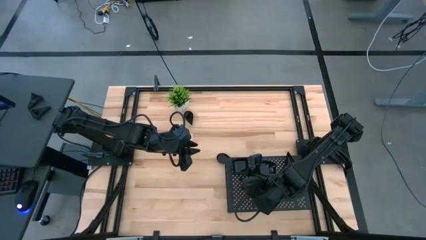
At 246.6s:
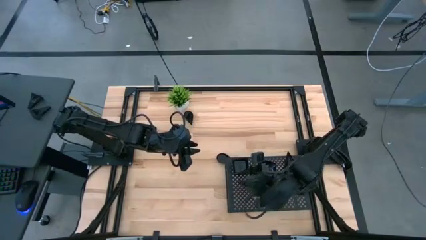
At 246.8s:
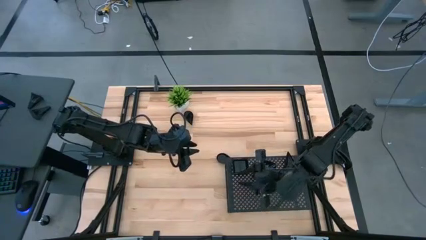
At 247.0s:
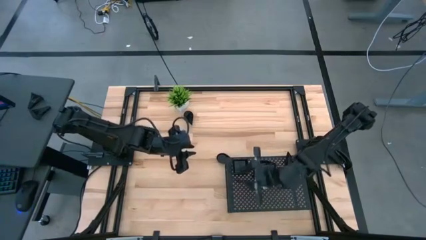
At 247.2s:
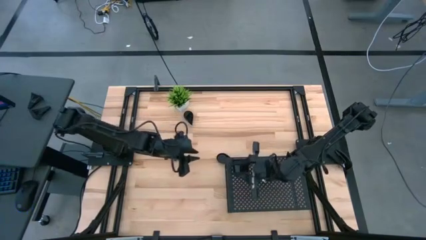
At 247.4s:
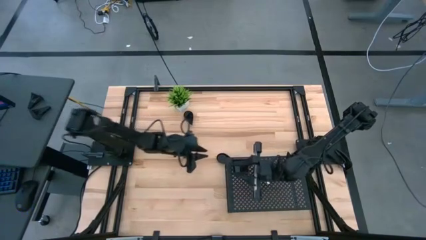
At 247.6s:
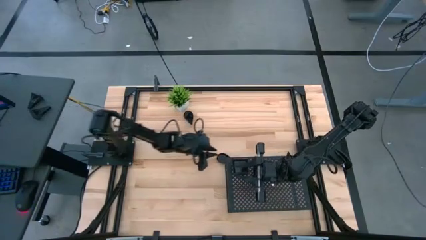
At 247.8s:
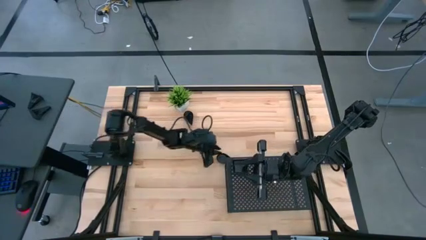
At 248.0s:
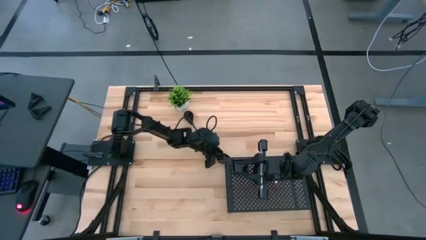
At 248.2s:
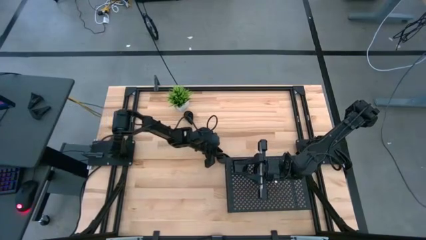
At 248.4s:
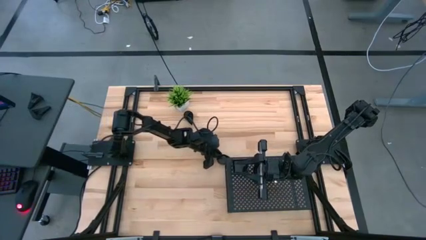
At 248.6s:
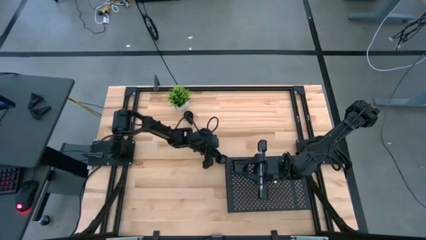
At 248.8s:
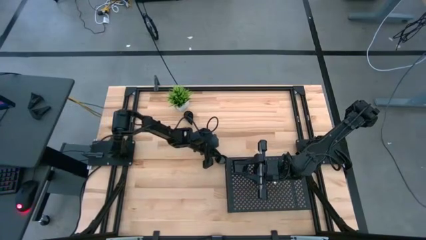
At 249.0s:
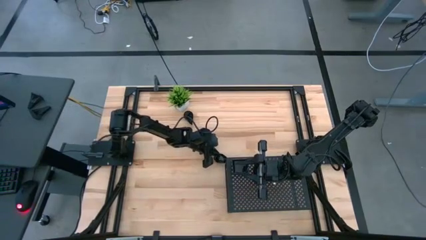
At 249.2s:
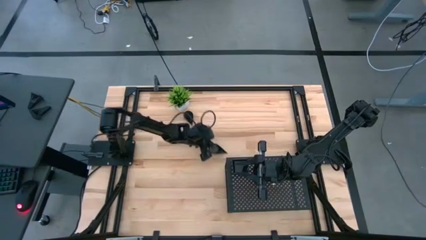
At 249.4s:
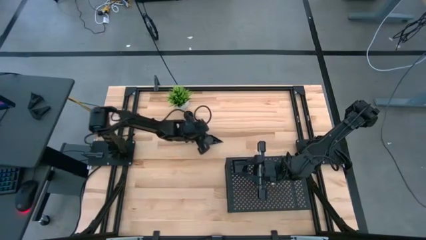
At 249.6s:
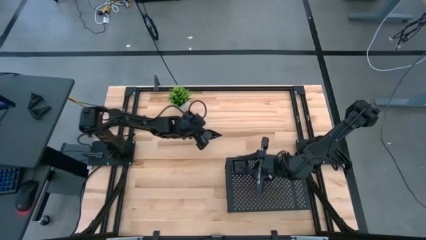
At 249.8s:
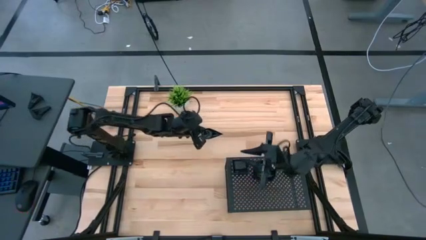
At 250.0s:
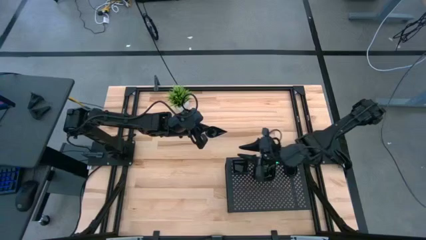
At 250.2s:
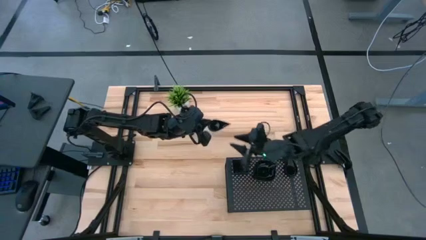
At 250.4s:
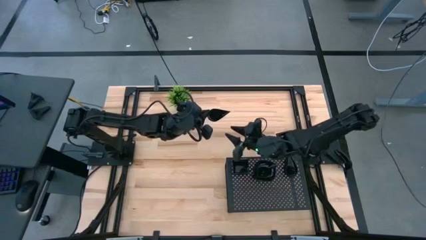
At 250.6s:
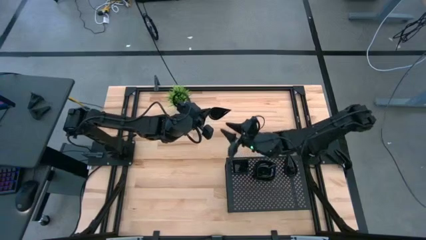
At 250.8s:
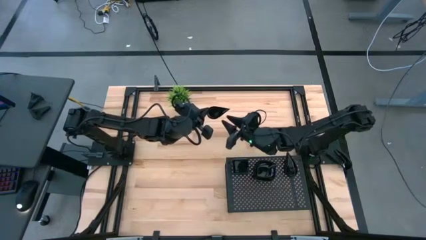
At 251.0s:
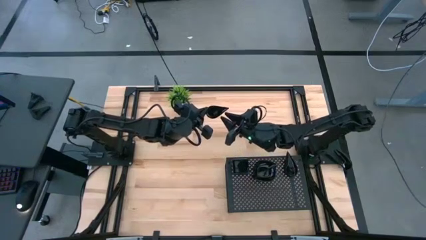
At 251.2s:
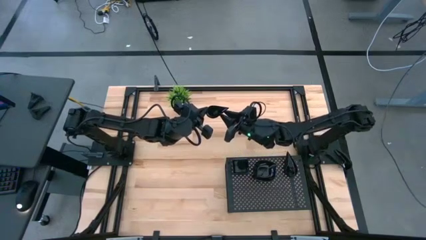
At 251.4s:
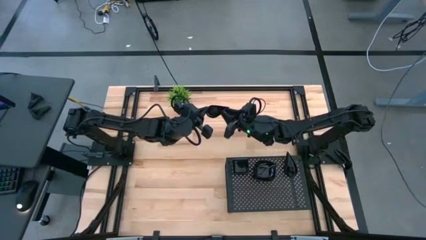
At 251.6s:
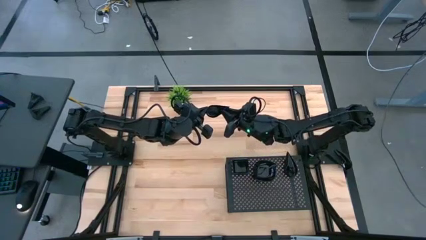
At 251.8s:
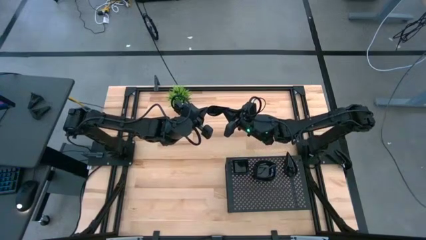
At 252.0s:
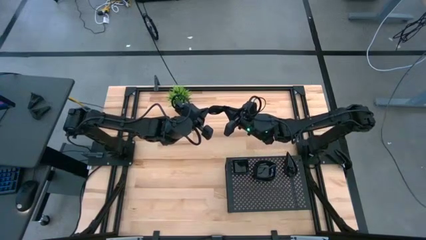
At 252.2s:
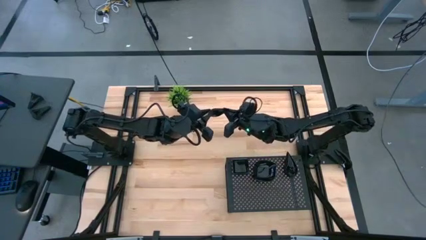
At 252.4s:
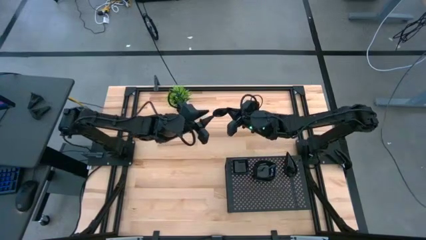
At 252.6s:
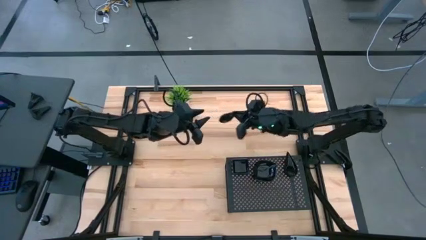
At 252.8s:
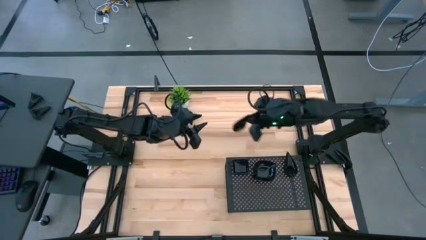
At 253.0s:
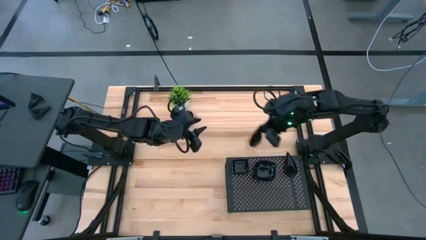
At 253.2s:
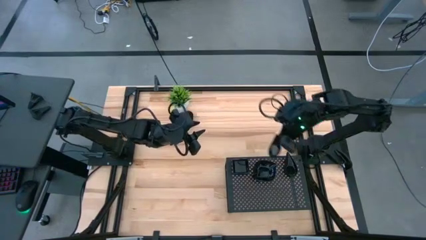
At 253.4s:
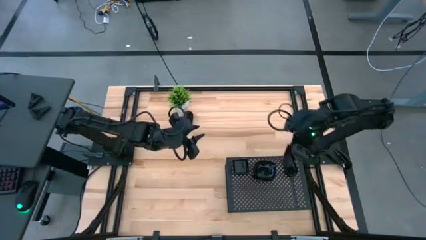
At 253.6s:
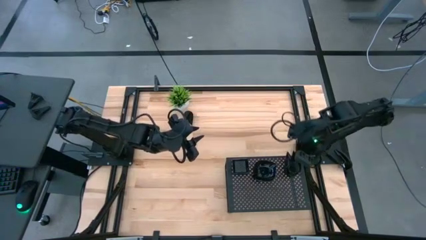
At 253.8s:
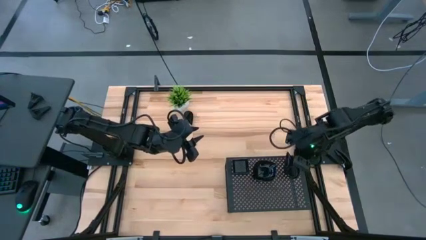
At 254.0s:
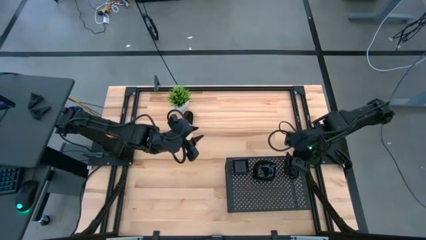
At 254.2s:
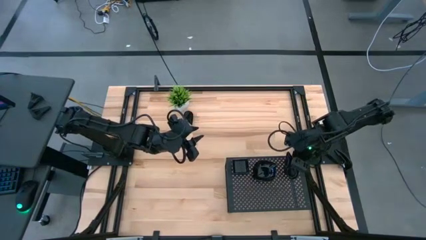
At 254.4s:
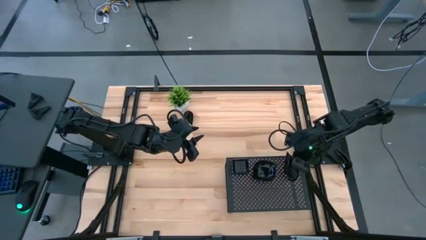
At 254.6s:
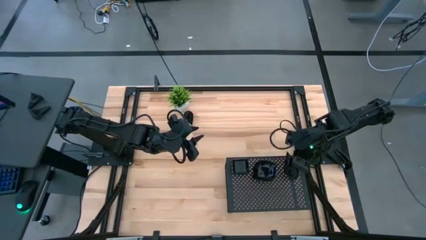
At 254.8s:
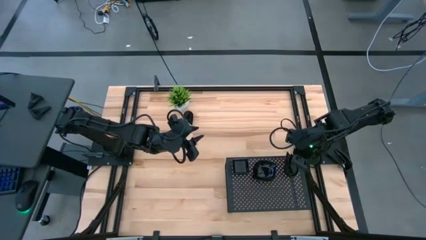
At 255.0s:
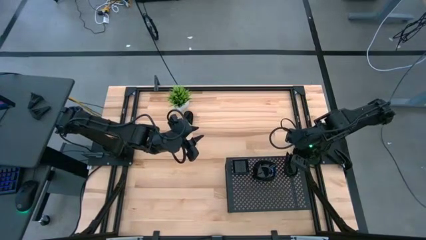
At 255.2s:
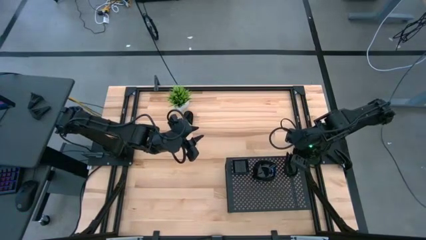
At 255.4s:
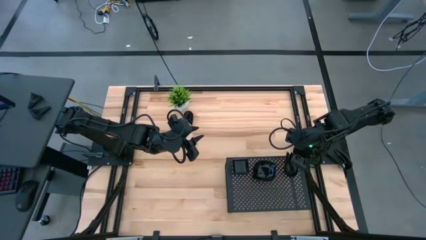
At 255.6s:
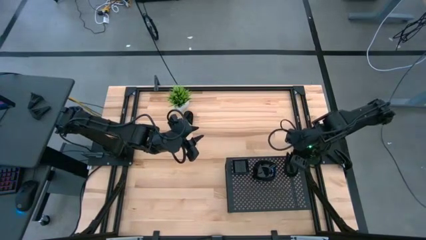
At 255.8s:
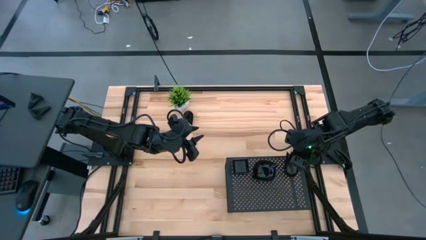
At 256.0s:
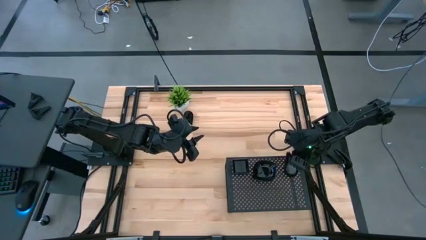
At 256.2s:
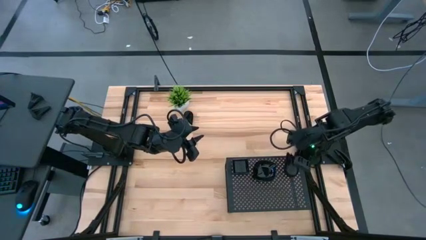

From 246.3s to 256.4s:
Task: Pick & Place Mini shaped plates
Stack the drop shaped plate on top of the drop shaped plate on the shelf

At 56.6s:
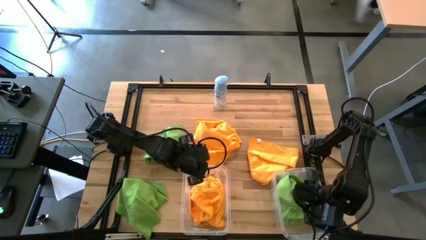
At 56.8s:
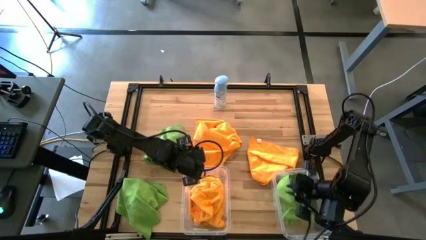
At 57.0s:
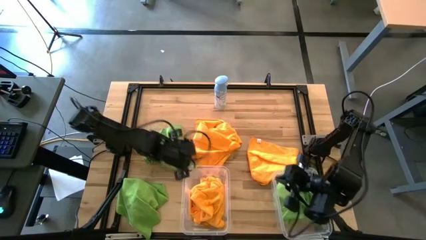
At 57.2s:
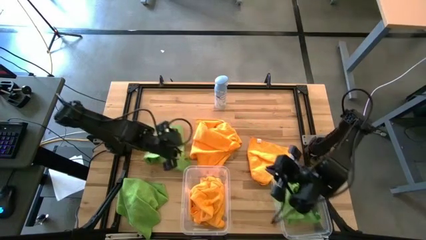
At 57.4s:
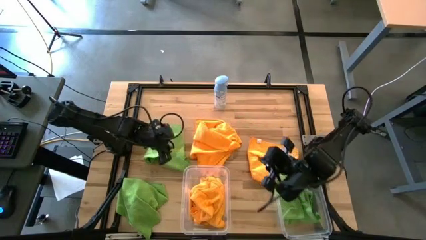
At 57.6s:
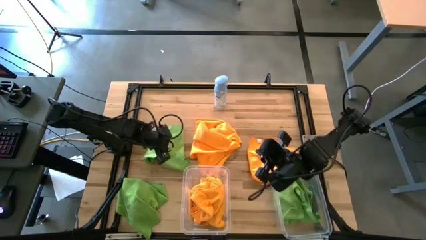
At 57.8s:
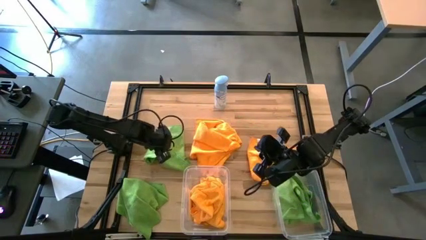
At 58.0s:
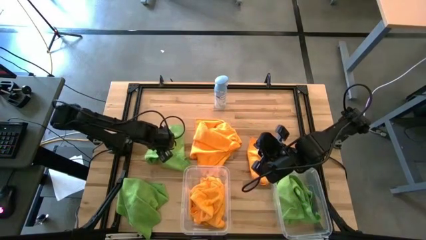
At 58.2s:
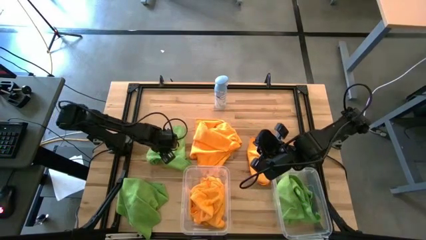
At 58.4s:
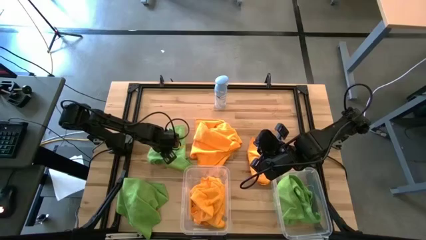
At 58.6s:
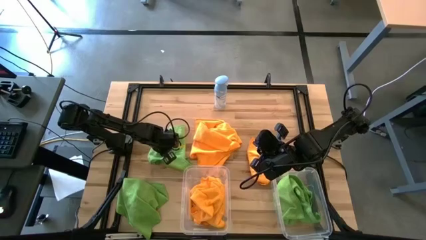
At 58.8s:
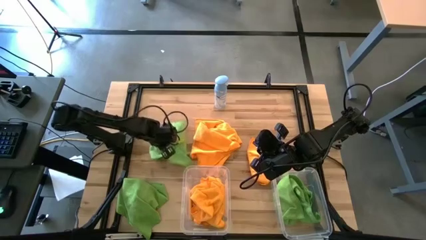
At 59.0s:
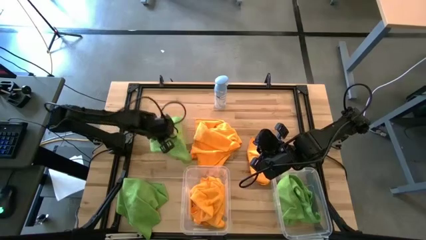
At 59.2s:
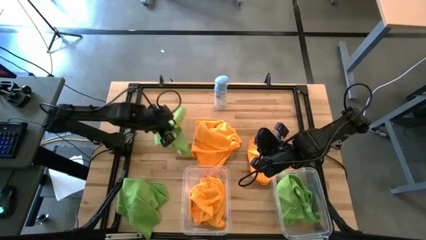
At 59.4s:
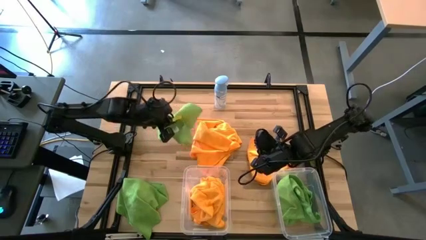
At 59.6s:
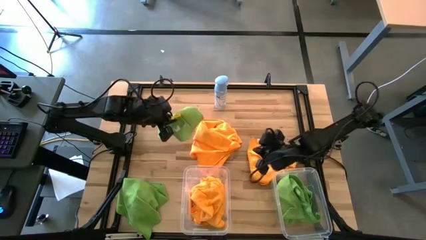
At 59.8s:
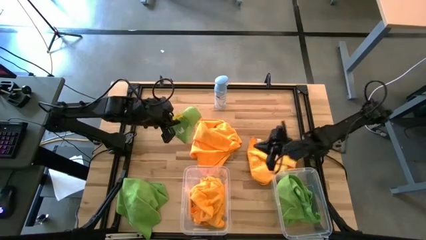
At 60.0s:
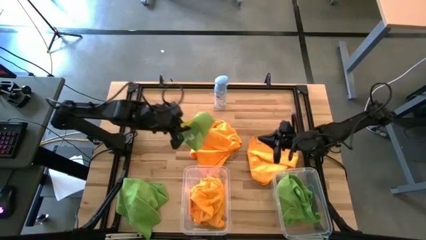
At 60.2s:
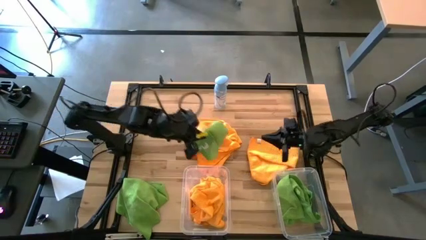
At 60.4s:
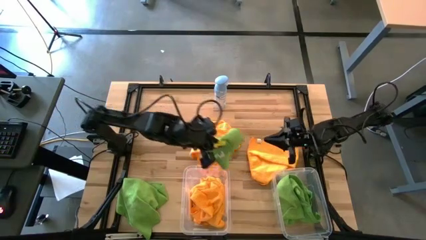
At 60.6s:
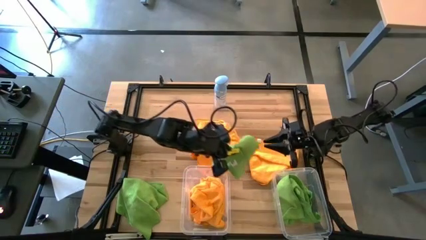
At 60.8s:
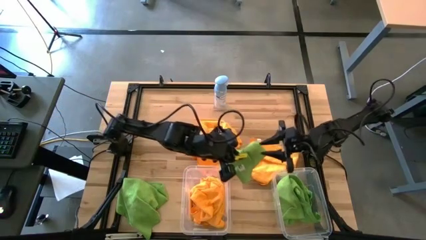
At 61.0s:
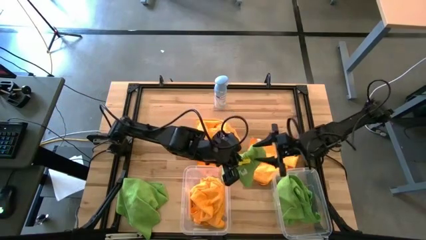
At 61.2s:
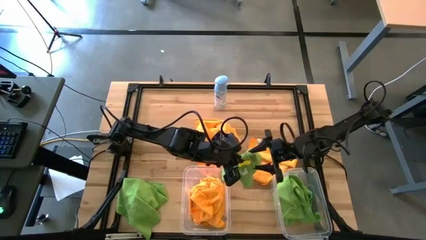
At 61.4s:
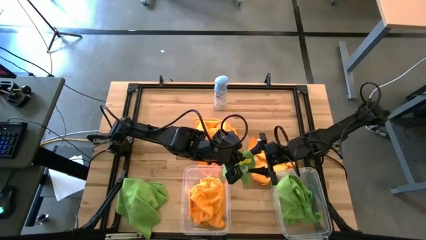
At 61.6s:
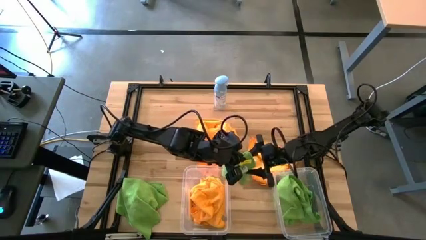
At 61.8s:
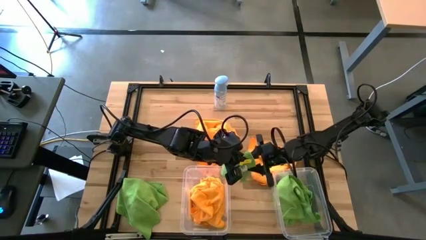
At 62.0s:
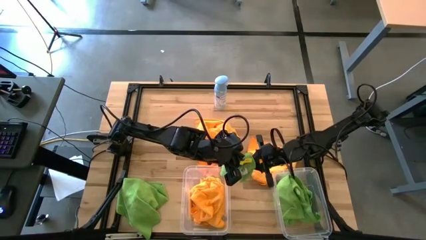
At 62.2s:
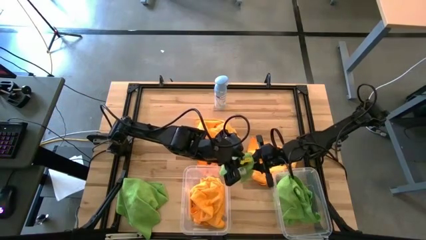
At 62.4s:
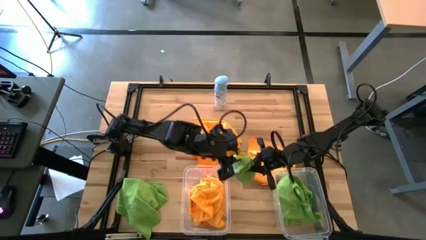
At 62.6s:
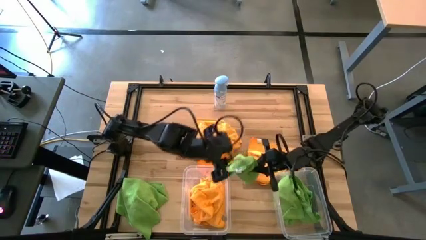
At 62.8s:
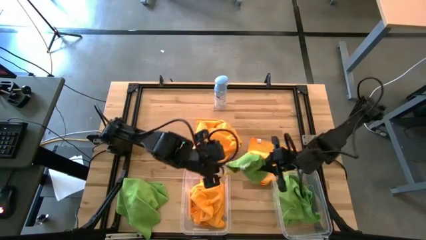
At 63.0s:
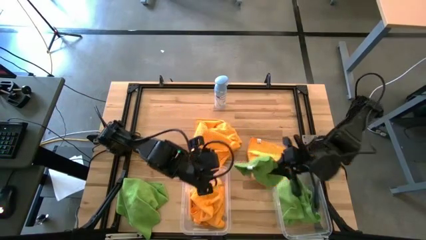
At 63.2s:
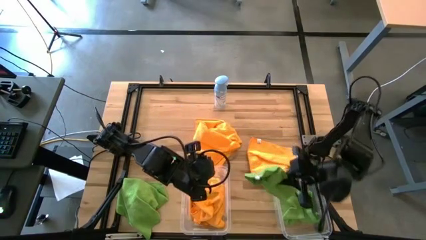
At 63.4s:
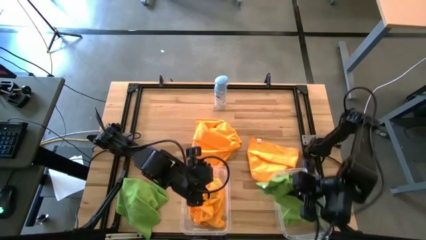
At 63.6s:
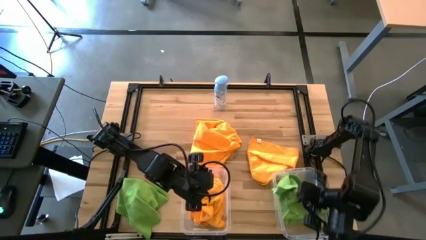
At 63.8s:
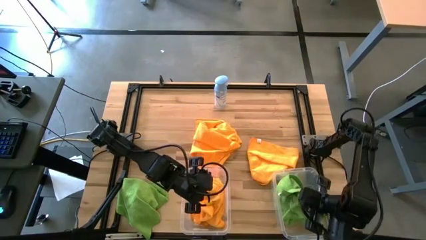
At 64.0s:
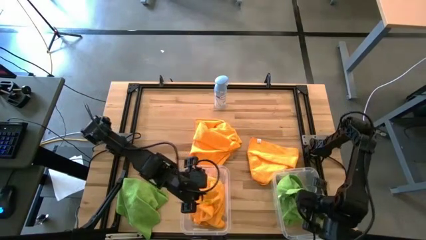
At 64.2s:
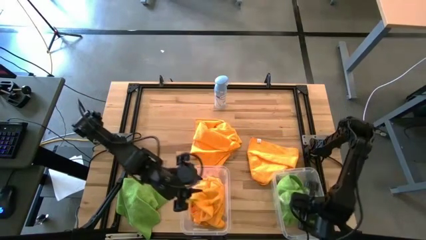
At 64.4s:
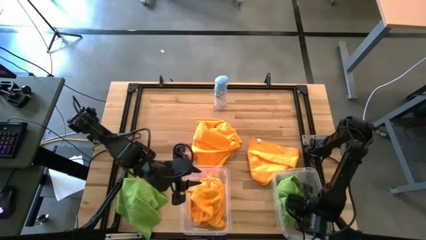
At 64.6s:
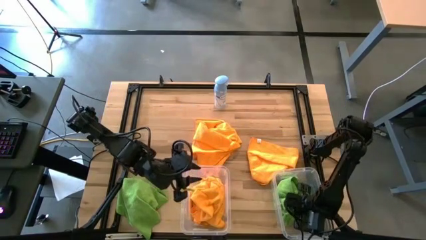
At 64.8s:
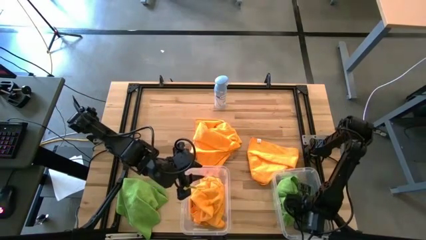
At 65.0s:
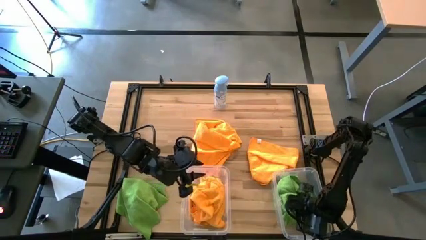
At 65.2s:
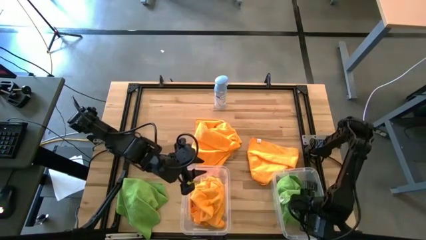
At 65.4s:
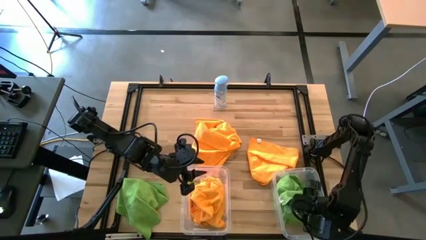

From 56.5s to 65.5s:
Task: Sort microfiber towel by color & place in baskets
Put the green towel into the right transparent bin
